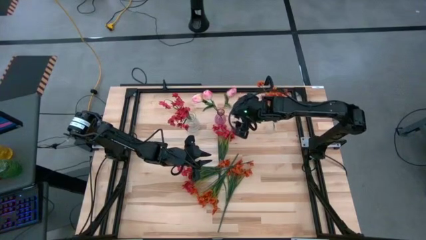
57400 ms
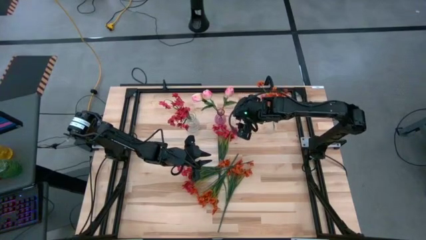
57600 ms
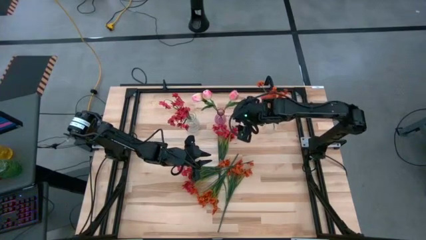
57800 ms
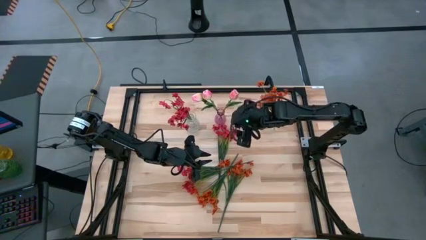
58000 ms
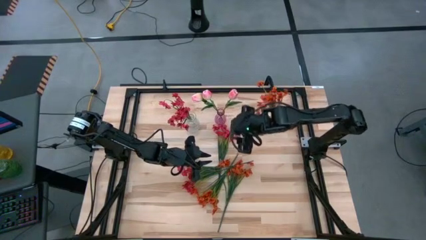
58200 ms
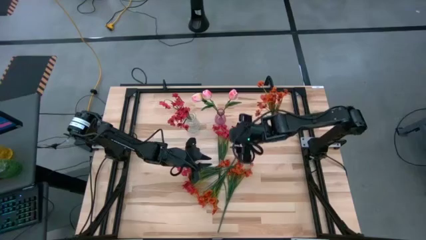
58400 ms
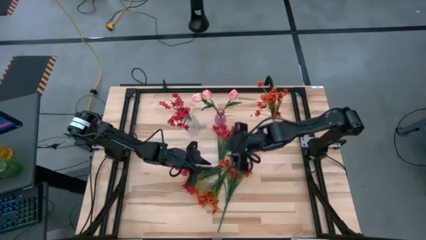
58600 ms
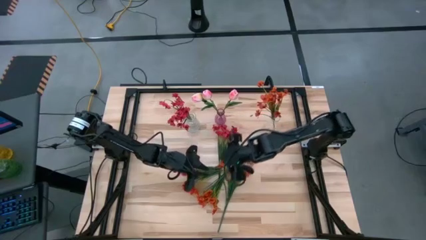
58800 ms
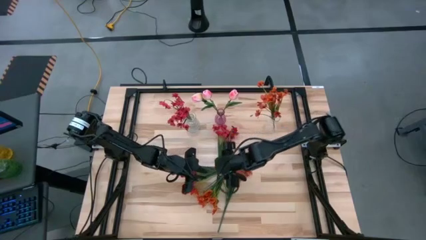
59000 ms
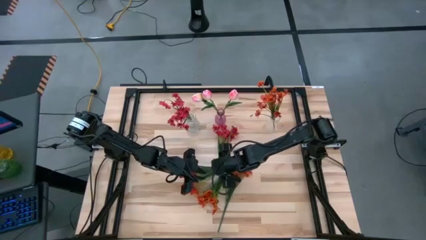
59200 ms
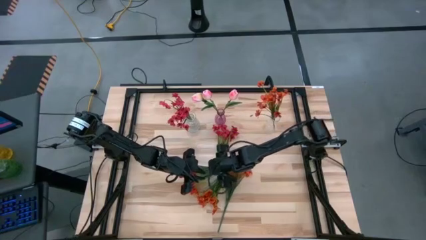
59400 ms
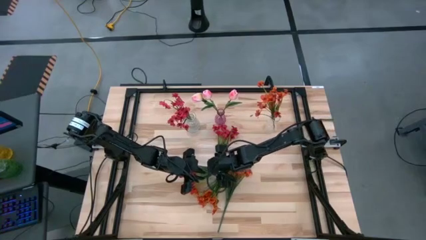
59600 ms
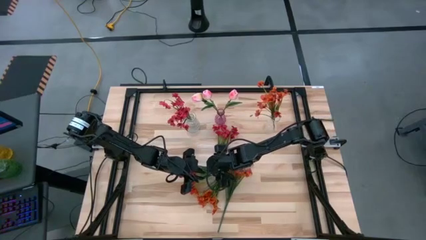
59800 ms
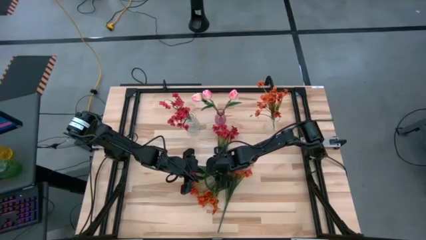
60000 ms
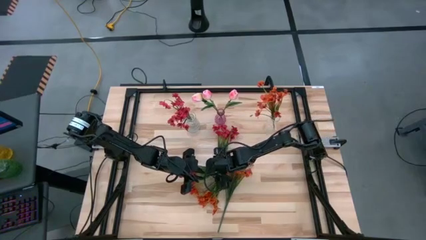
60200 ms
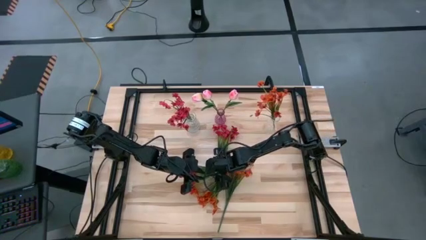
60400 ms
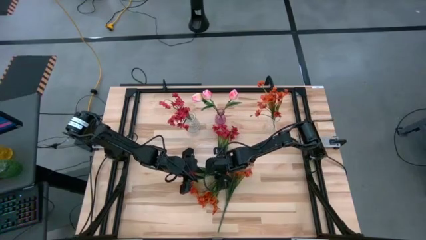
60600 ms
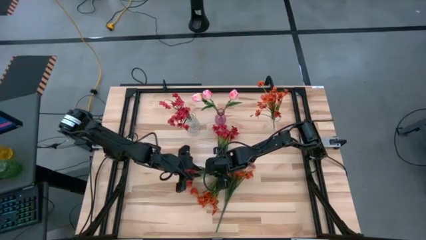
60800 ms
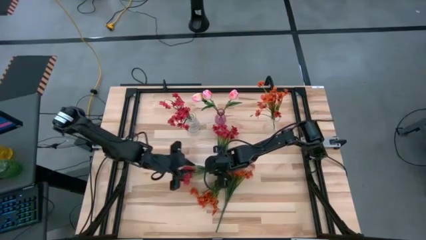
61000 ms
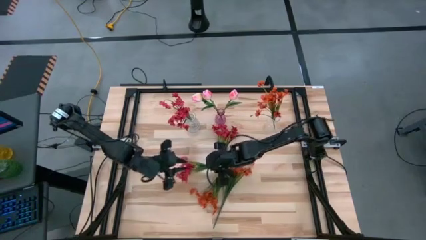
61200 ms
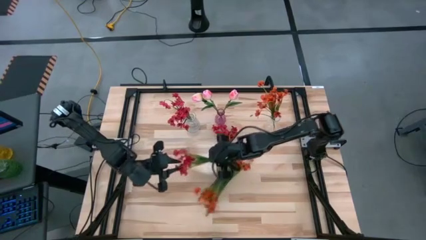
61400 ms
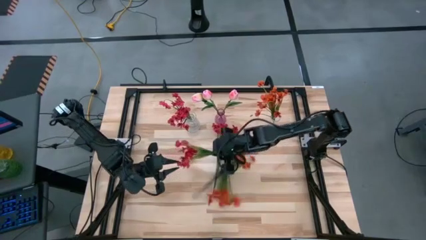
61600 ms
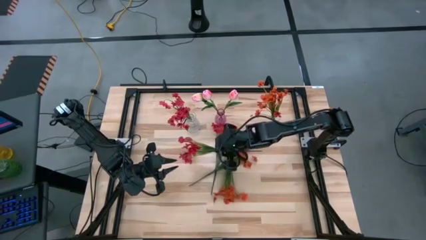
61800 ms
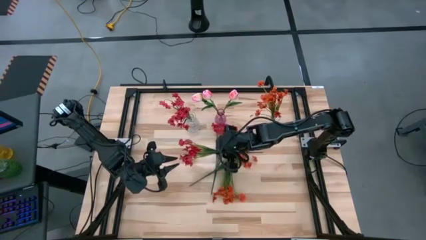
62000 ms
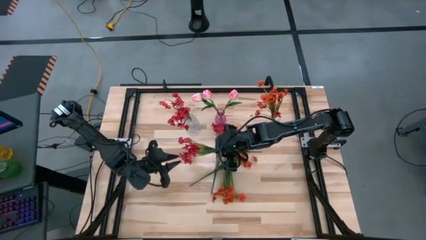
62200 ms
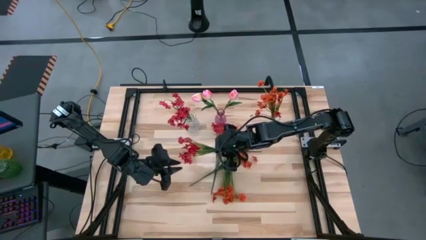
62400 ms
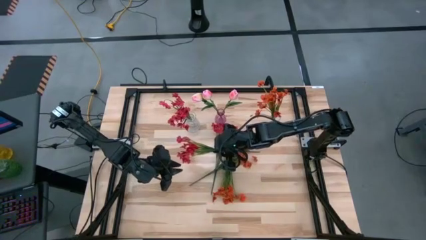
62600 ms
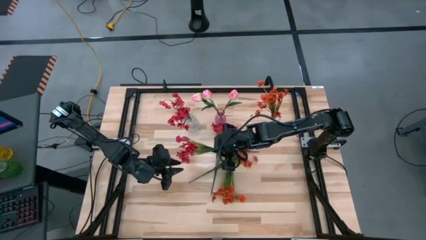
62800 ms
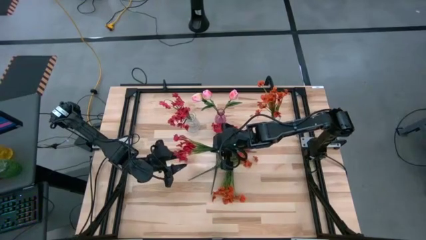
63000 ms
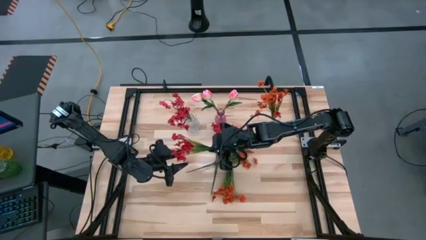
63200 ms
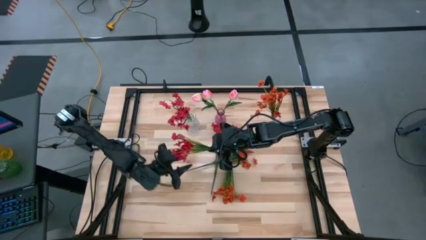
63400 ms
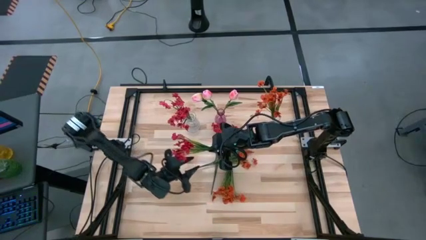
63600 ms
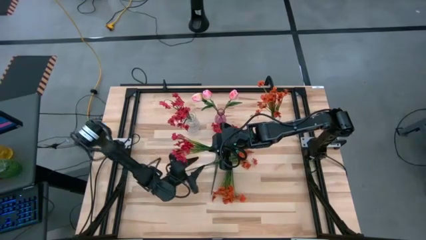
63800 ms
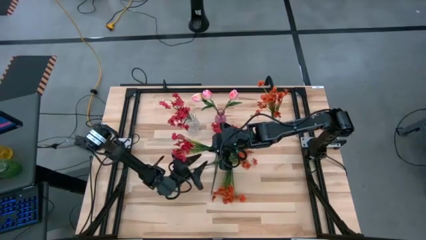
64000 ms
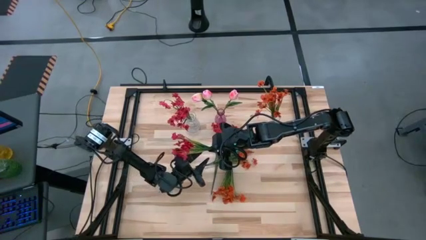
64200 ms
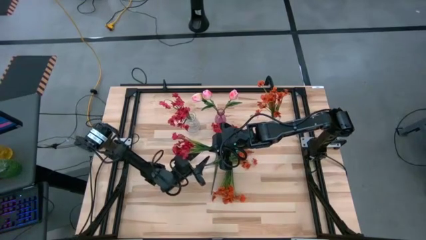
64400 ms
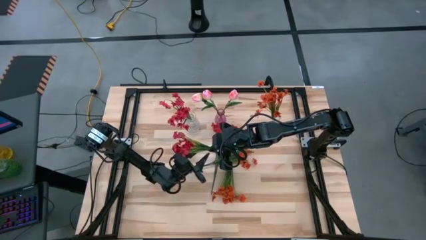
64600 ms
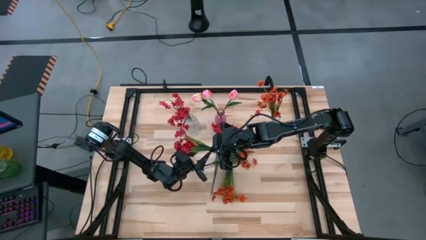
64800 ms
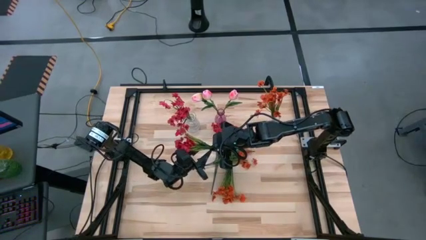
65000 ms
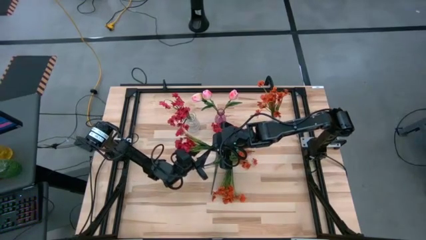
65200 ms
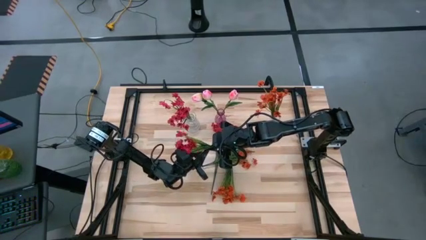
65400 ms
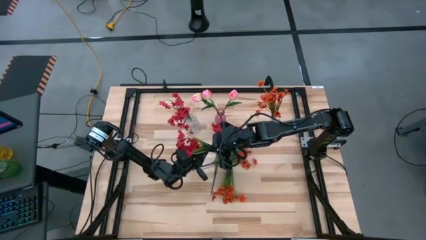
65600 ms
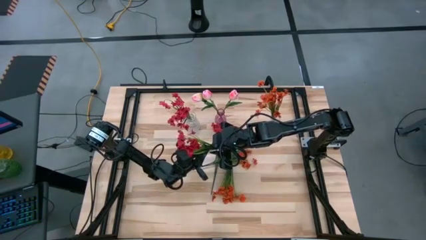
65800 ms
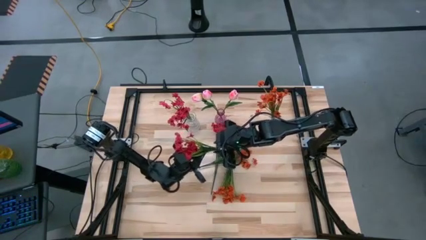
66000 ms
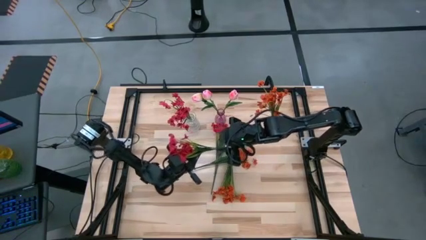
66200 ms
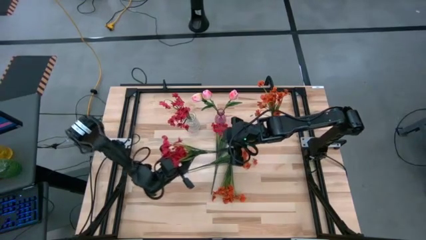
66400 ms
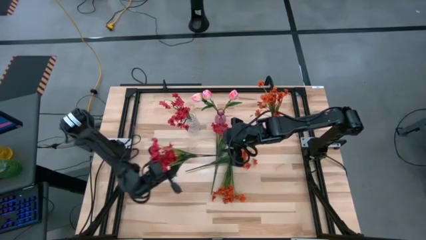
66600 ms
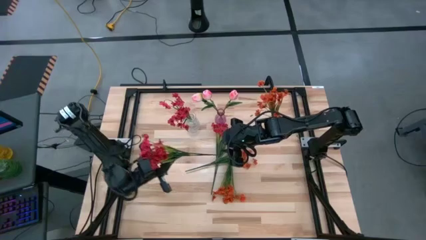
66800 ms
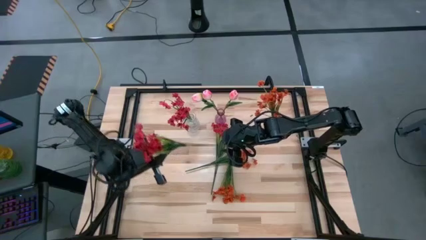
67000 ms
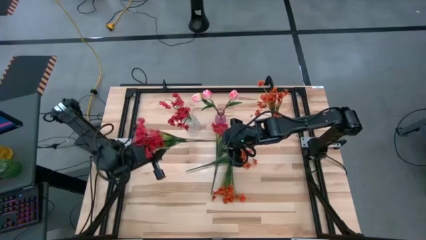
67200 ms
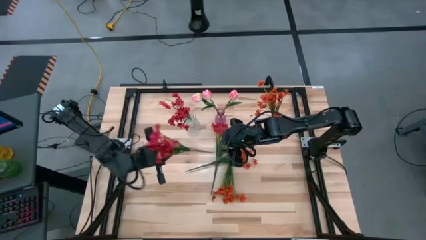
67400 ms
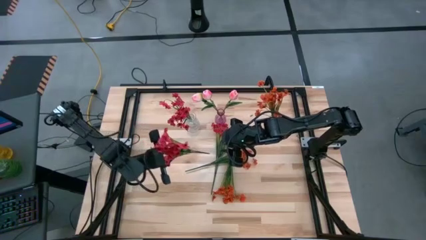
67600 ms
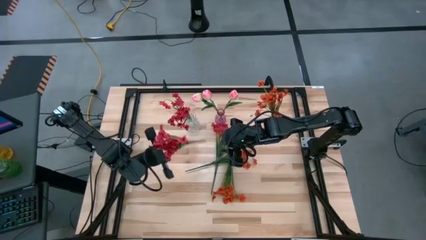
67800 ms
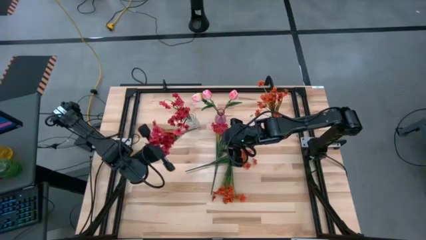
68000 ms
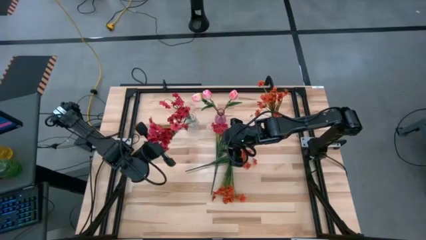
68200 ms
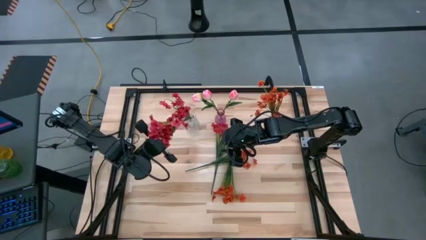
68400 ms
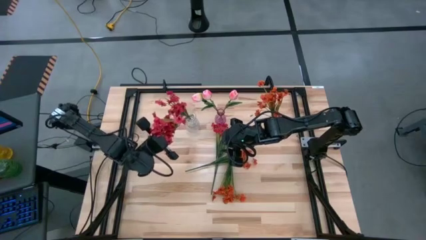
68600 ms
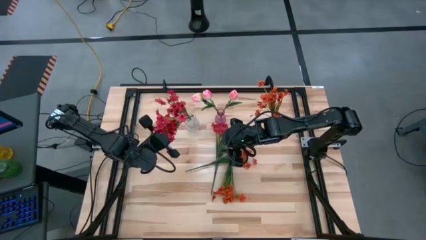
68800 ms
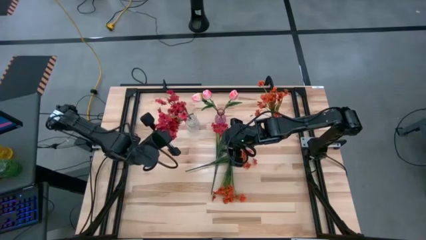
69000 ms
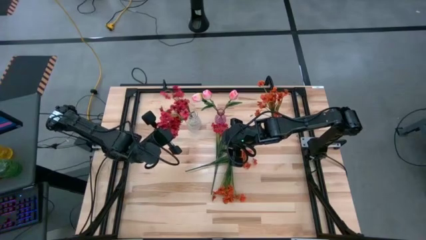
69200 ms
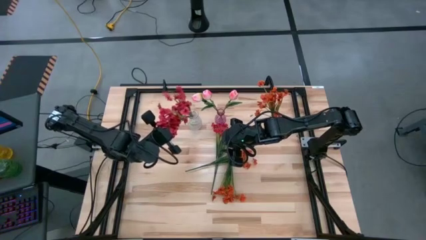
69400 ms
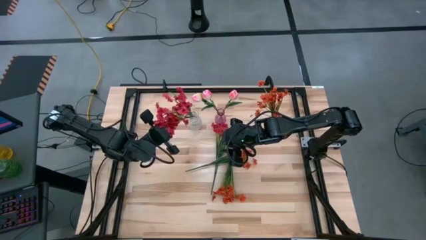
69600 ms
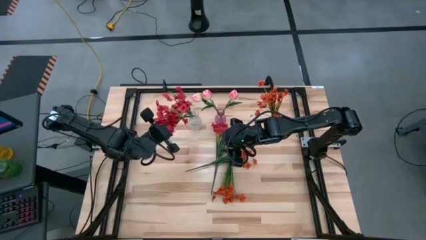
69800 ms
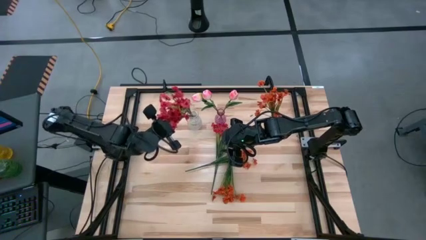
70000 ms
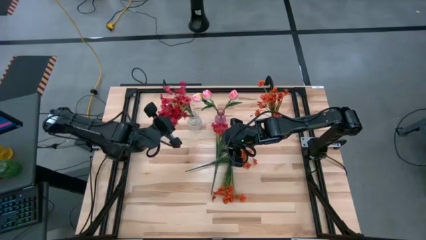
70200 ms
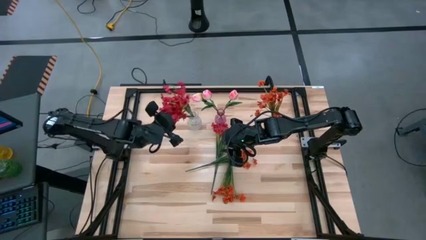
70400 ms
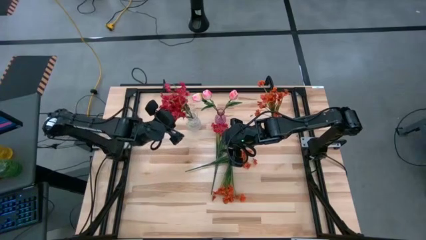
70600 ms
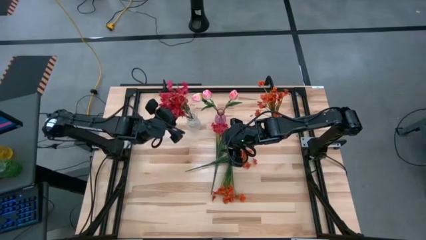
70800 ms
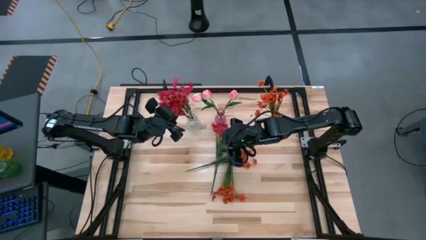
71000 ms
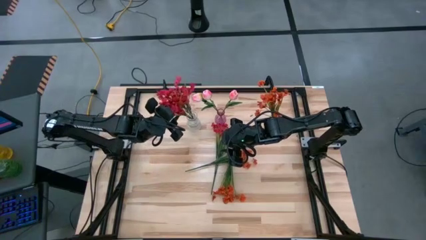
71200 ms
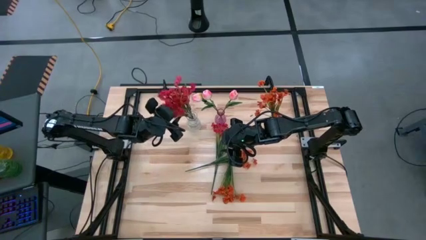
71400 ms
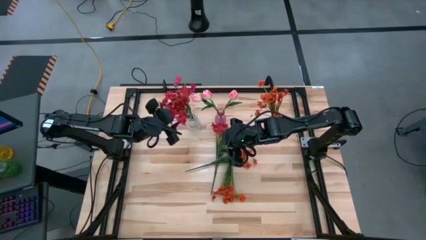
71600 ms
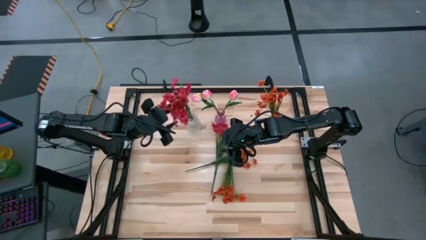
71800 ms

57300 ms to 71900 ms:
Task: Sort flowers into vase by color
Put the left red flowers into the left transparent vase

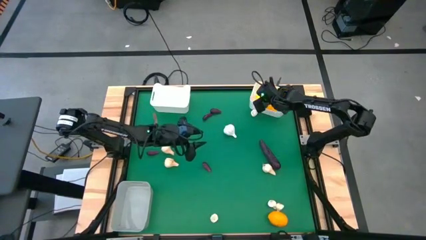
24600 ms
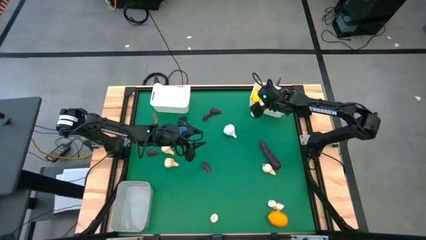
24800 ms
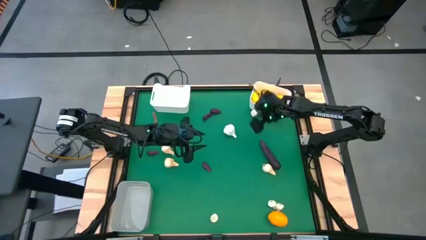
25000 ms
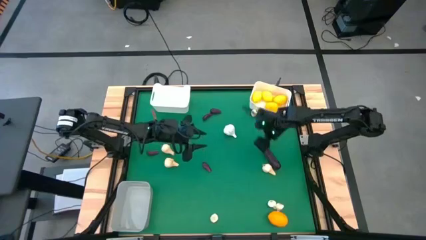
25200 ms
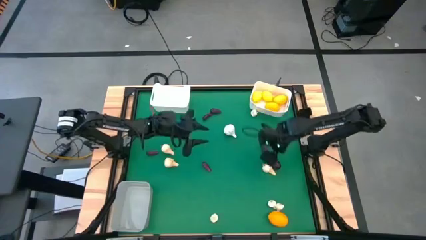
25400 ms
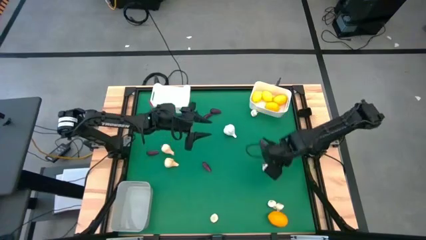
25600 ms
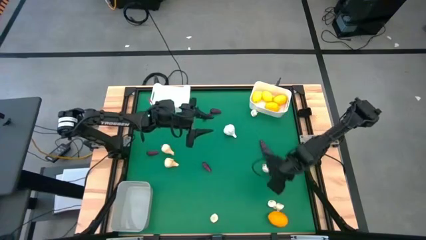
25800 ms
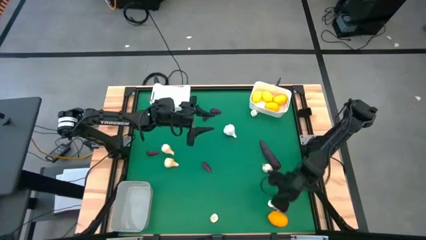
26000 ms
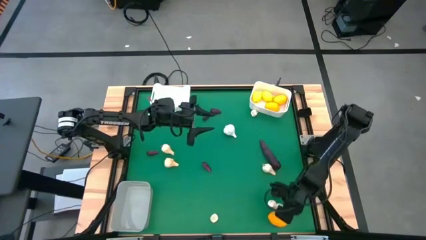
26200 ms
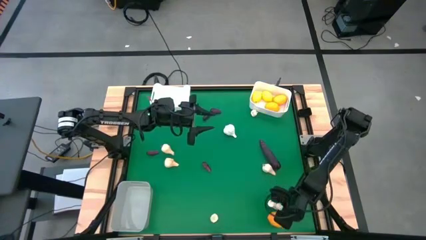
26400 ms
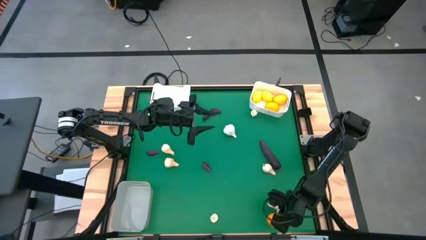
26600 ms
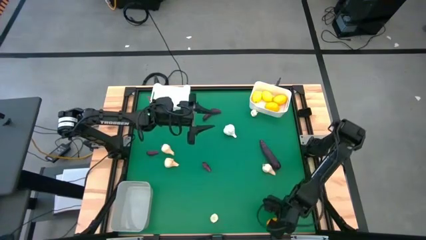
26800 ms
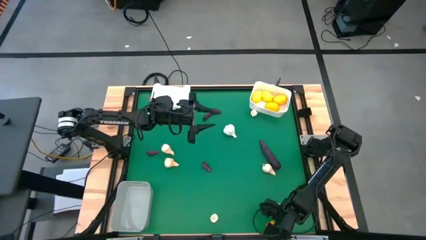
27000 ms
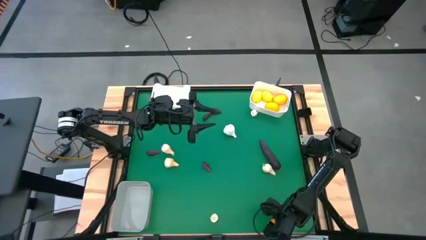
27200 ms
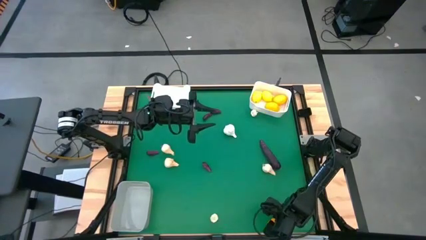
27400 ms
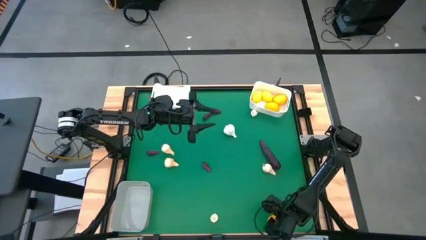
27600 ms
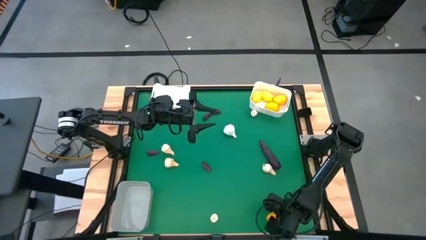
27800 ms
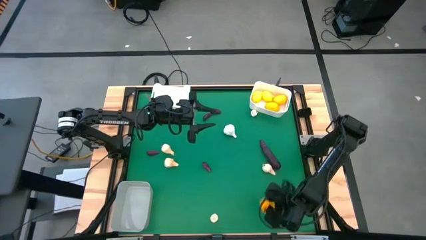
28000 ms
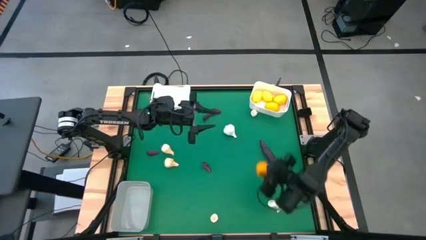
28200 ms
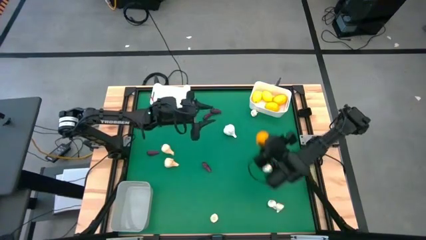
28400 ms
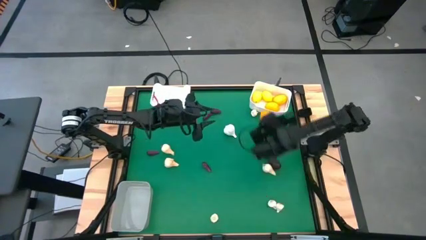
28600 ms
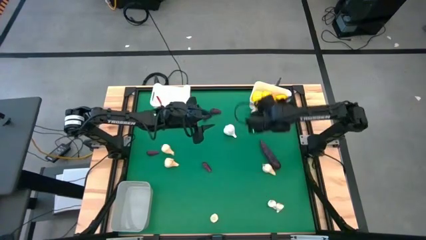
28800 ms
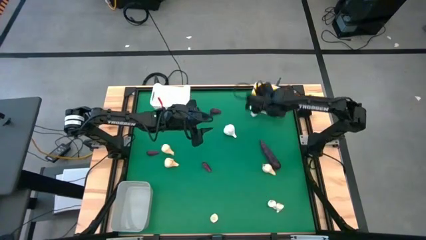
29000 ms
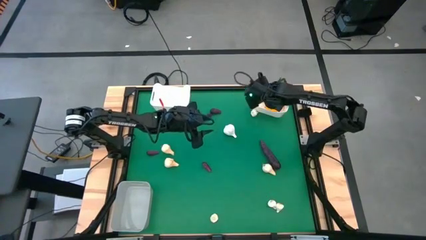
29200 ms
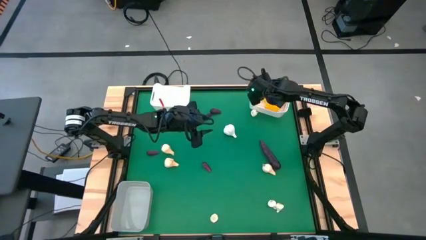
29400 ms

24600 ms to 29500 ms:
Task: Sort produce into baskets
Put the yellow lemon into the right white bin
